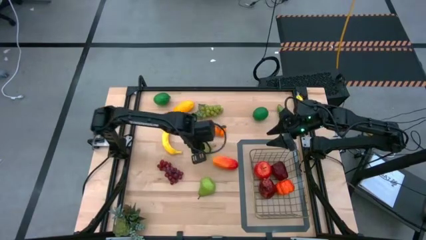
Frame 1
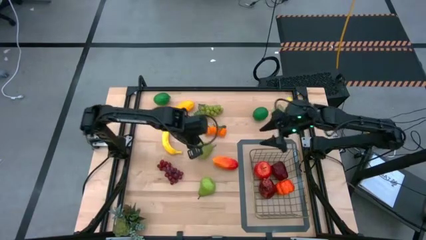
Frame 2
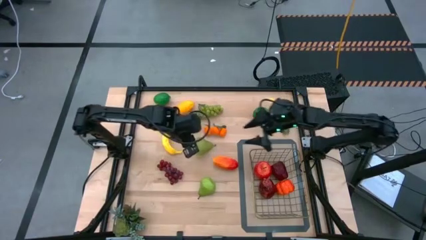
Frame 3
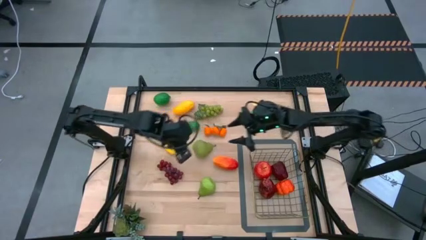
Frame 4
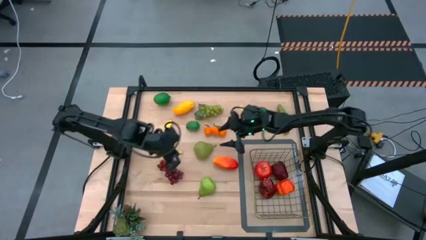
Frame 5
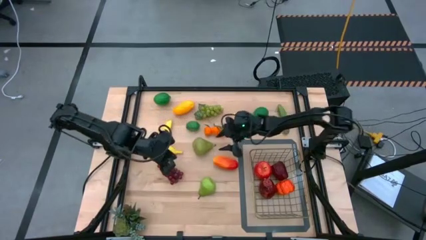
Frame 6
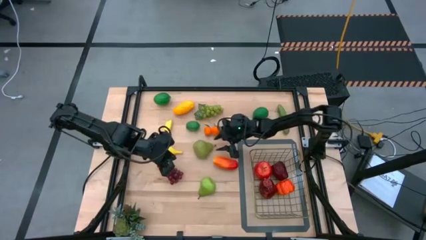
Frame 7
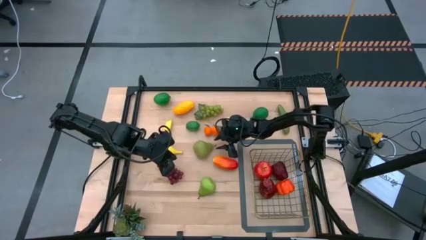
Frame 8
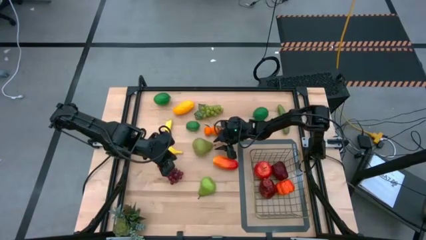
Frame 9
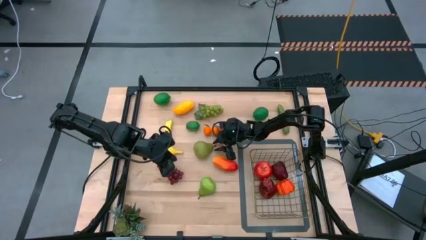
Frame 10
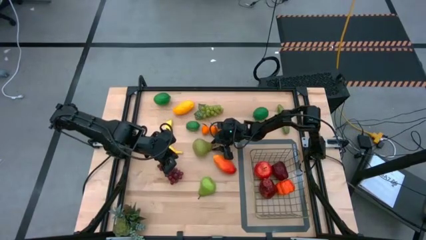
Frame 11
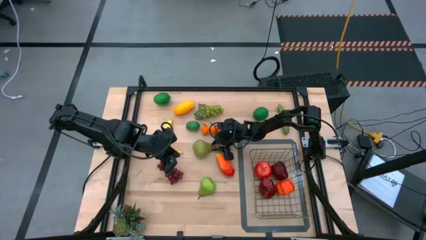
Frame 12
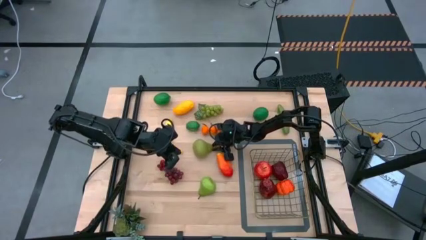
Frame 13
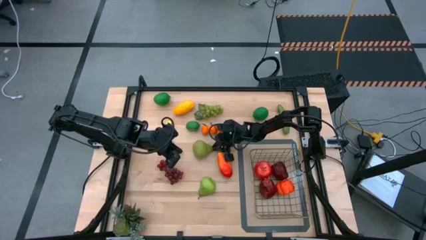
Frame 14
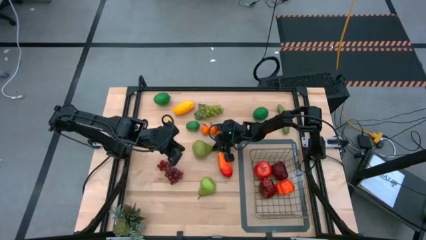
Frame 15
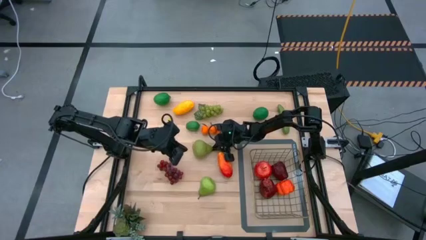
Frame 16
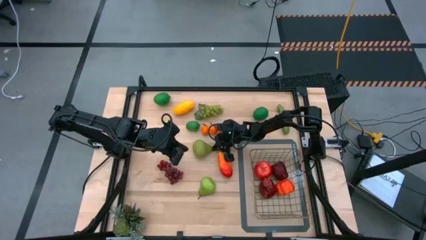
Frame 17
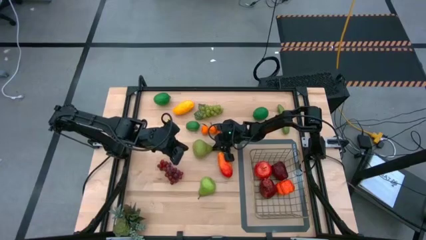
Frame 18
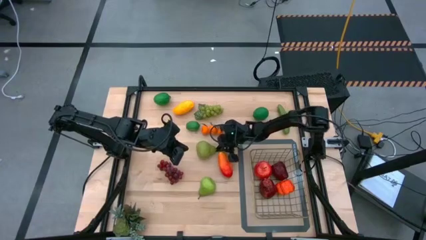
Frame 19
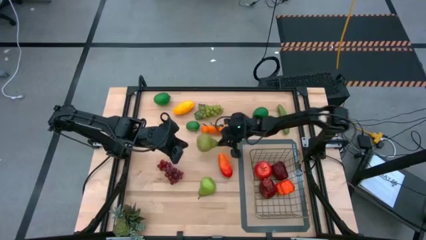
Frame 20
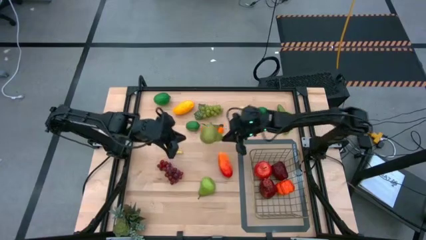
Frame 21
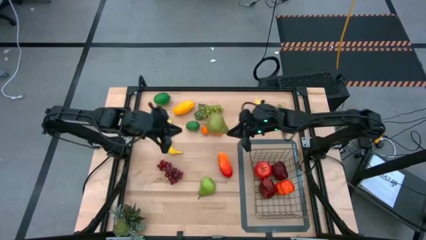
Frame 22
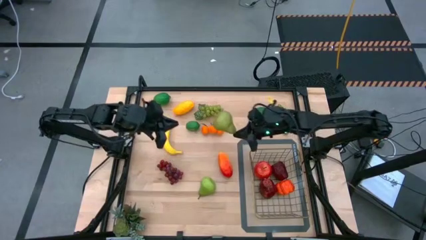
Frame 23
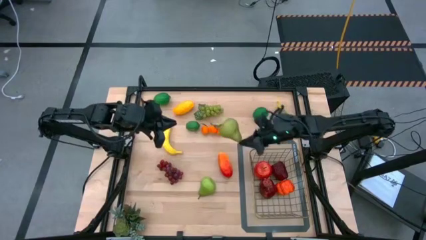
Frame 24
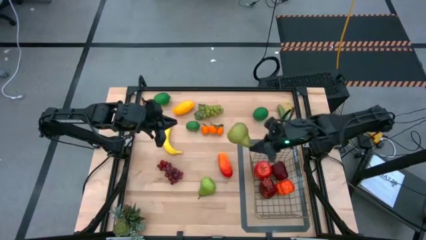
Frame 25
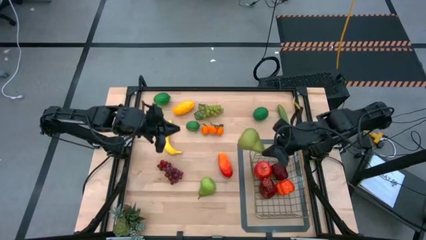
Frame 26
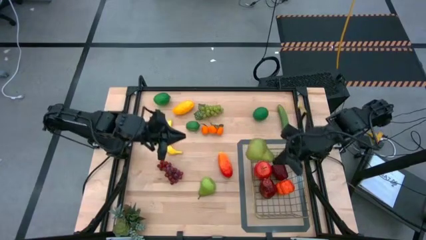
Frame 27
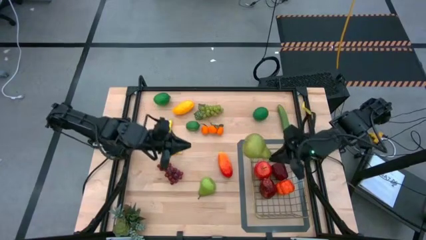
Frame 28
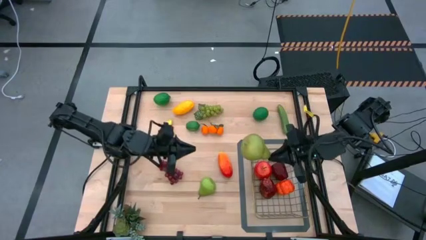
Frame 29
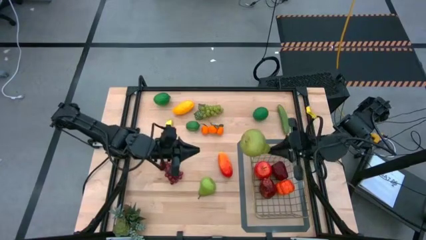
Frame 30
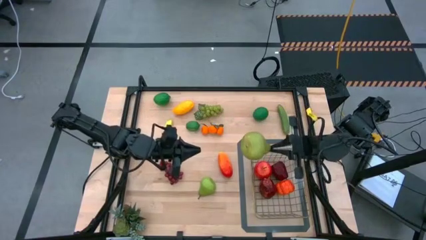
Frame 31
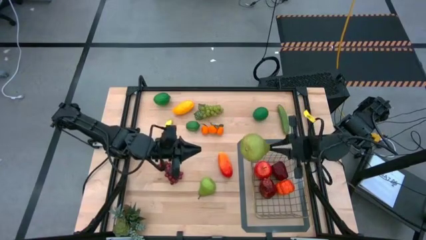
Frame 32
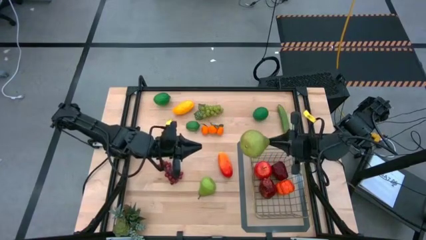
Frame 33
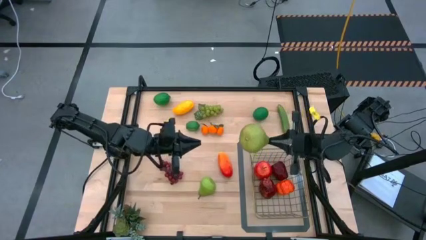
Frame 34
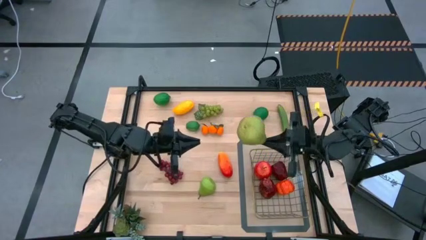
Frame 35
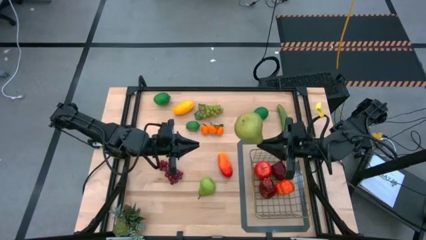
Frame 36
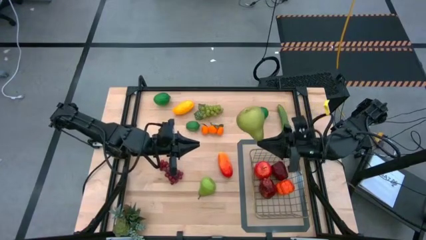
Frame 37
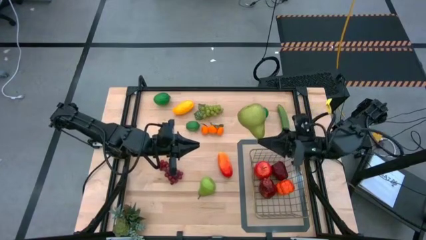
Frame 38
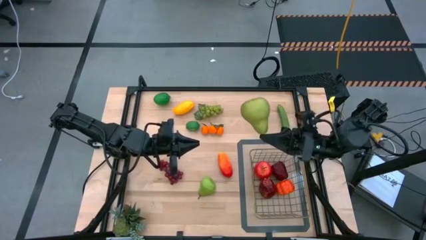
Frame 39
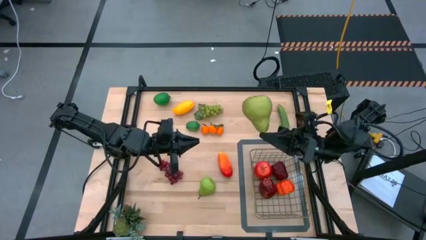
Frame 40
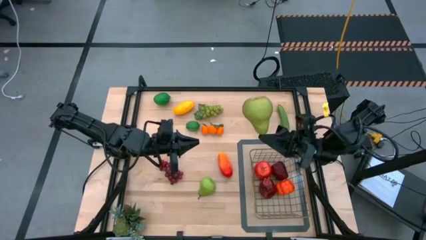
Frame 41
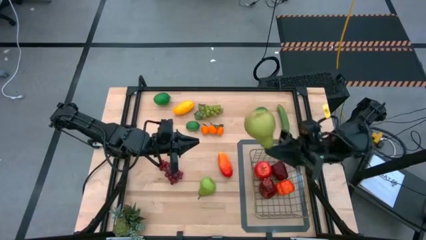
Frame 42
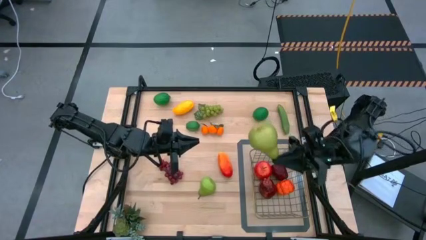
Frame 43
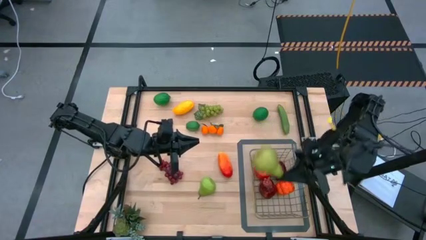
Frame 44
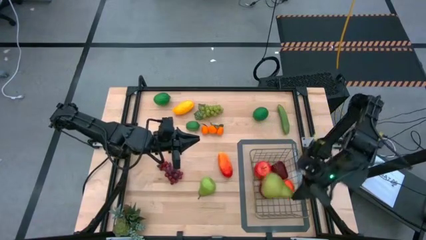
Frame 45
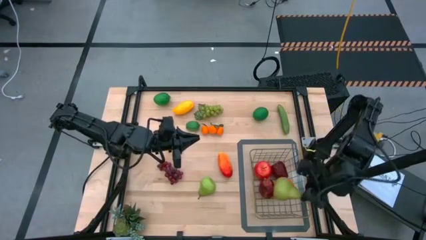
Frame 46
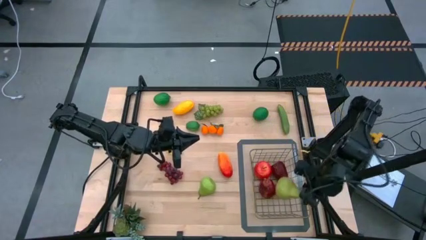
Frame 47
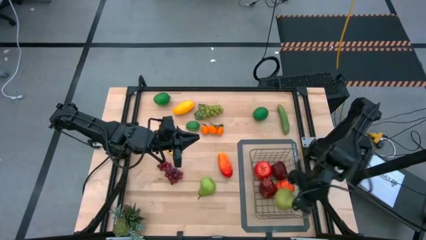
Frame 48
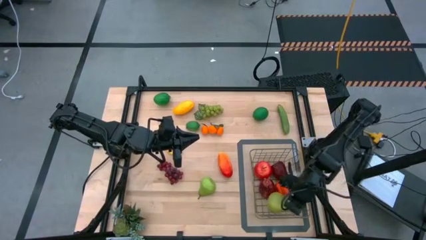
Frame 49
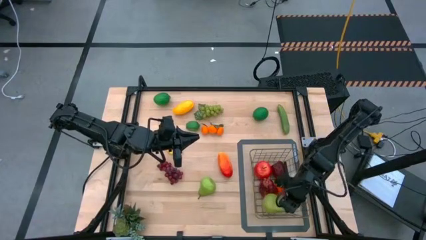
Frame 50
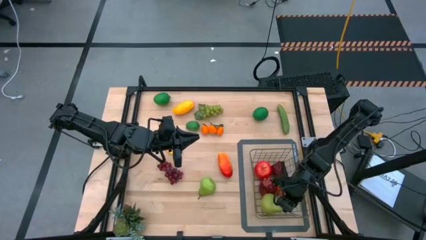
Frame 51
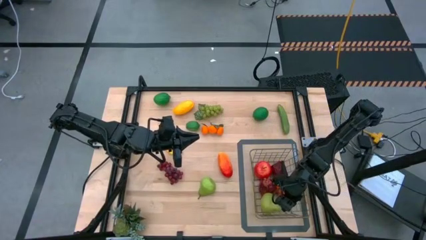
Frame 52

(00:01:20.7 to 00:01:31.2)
Task: Build produce basket
Put the top green pear into the wire basket

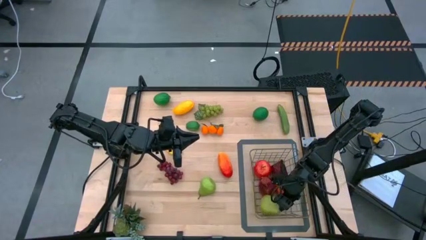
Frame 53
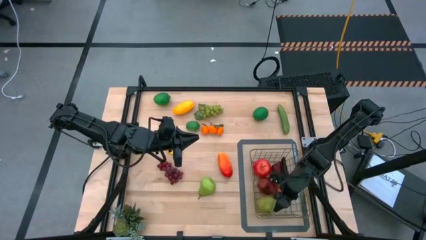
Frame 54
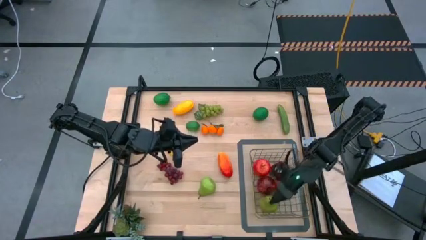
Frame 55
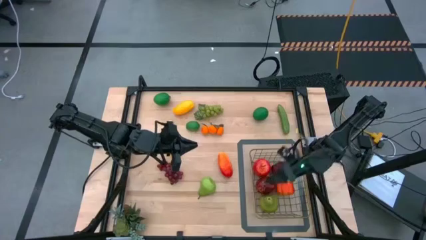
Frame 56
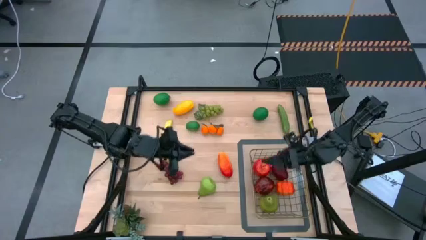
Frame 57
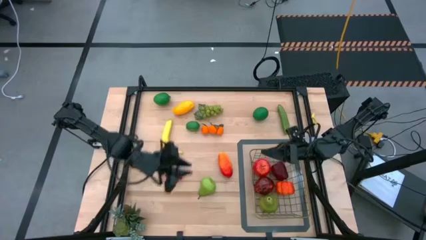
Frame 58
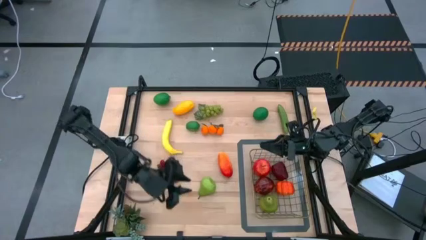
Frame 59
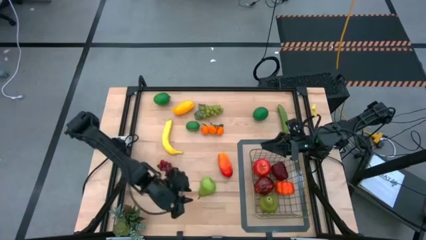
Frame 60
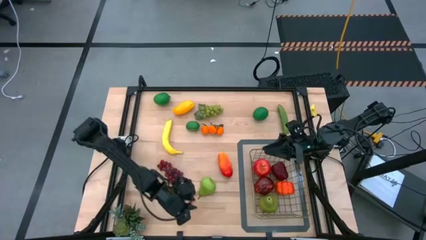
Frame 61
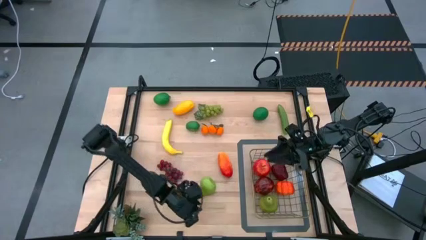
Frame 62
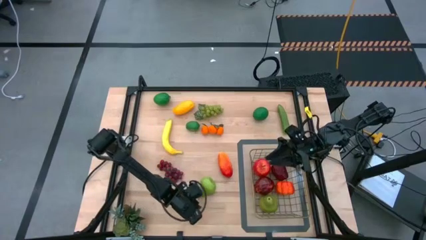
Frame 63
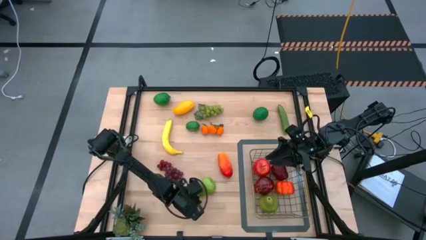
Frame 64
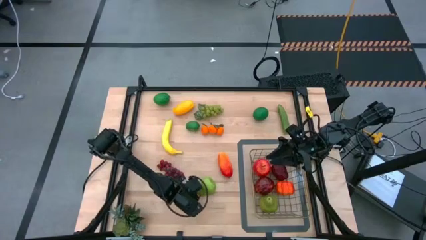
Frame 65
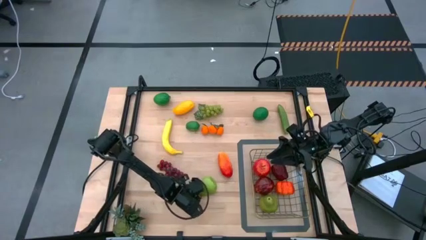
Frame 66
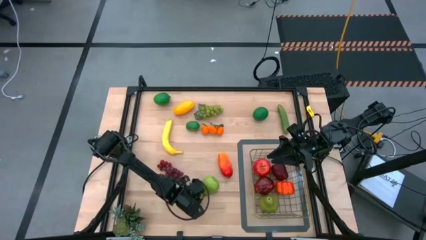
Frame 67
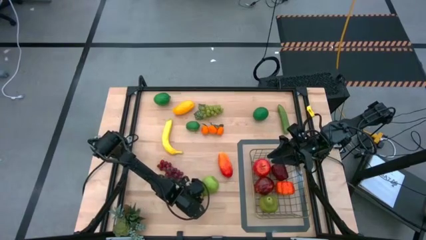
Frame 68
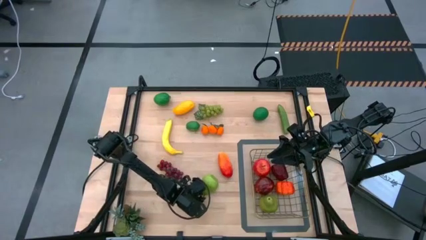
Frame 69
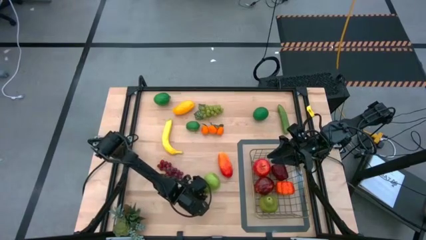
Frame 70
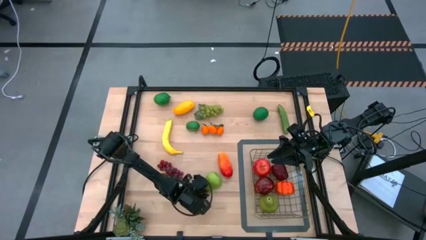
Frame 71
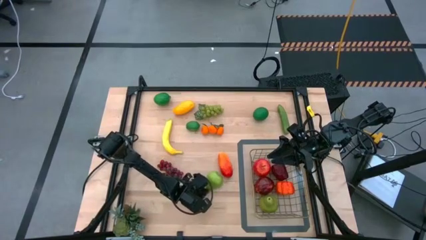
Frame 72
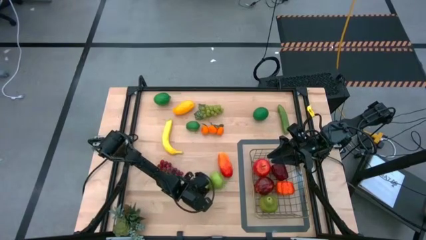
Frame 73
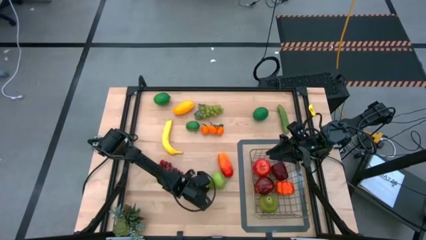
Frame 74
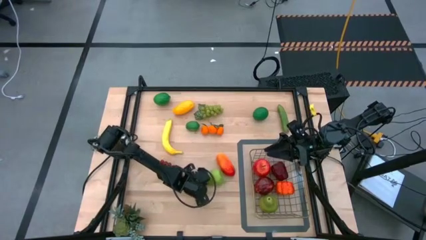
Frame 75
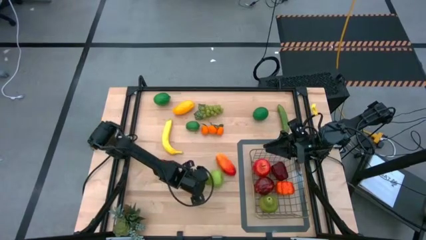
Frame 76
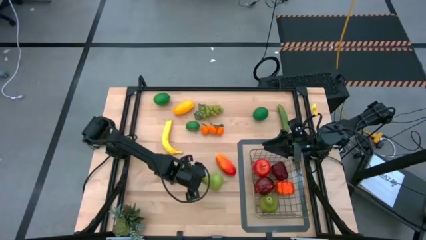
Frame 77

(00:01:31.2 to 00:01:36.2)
Put the green pear into the wire basket
